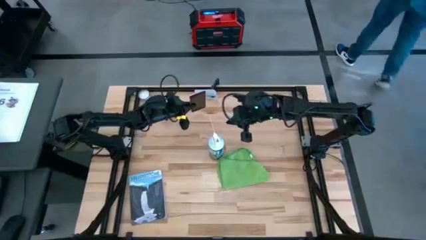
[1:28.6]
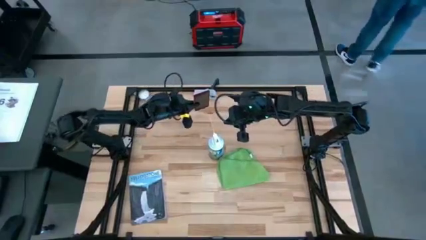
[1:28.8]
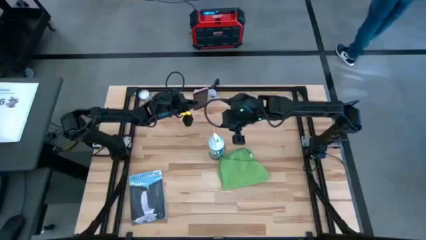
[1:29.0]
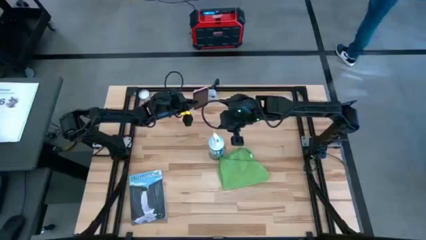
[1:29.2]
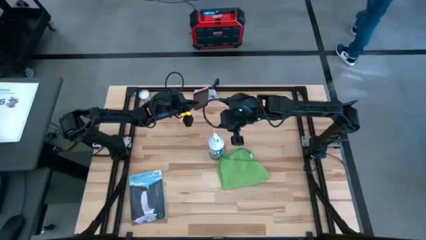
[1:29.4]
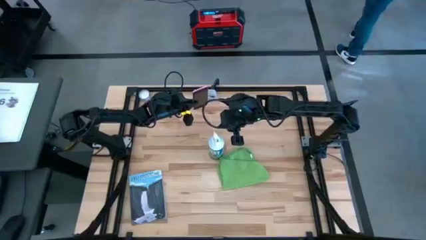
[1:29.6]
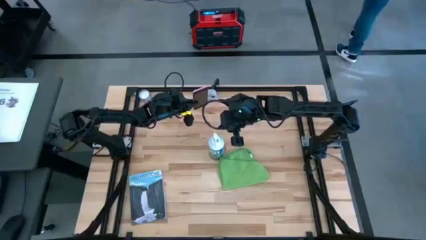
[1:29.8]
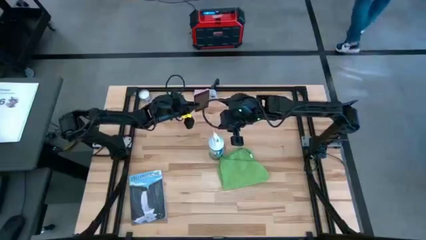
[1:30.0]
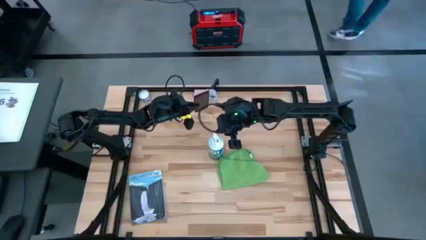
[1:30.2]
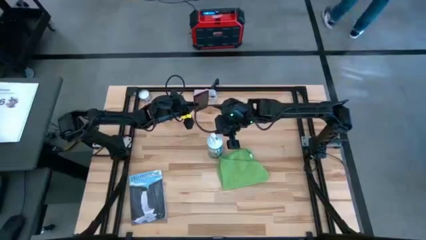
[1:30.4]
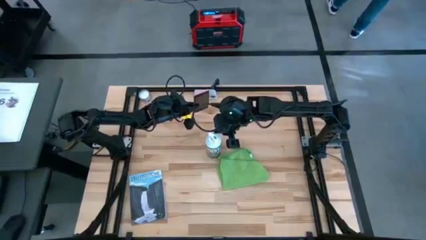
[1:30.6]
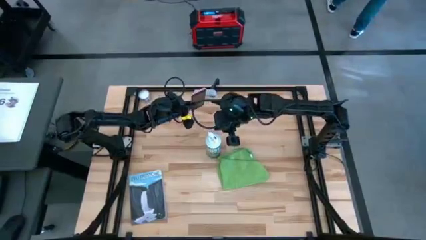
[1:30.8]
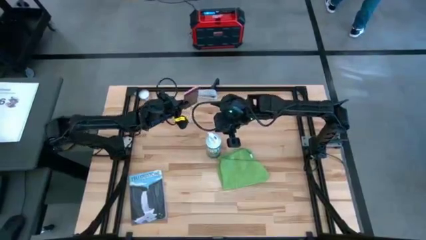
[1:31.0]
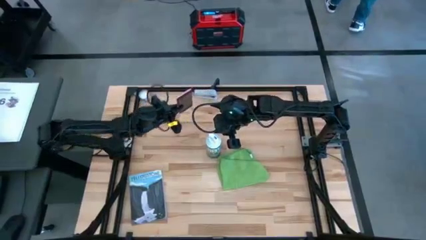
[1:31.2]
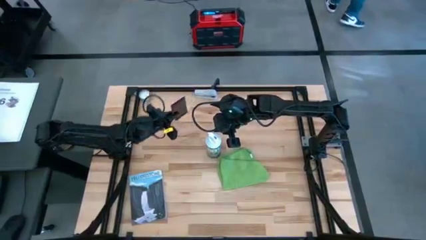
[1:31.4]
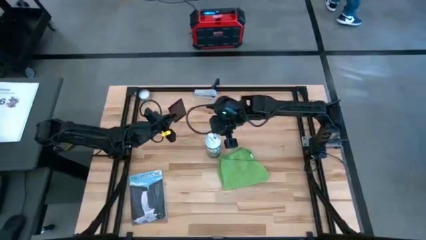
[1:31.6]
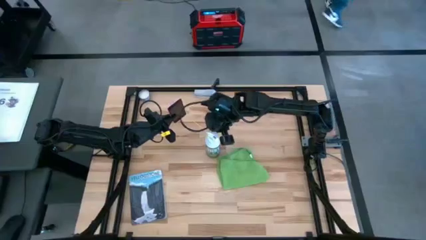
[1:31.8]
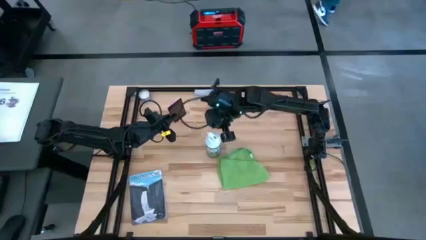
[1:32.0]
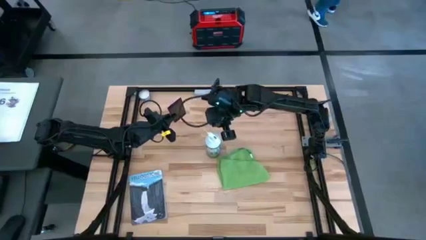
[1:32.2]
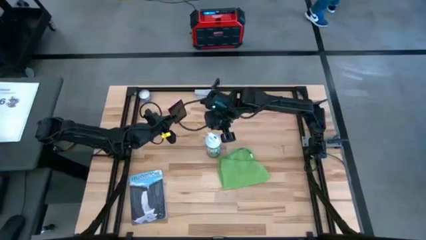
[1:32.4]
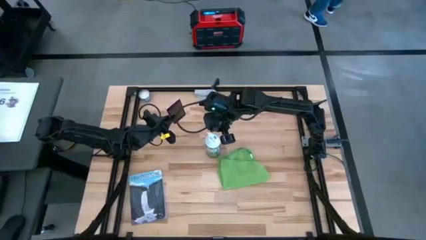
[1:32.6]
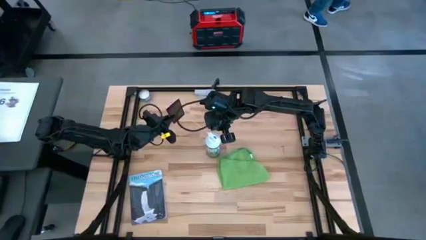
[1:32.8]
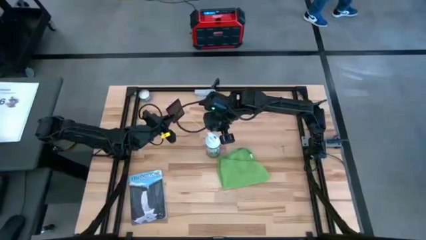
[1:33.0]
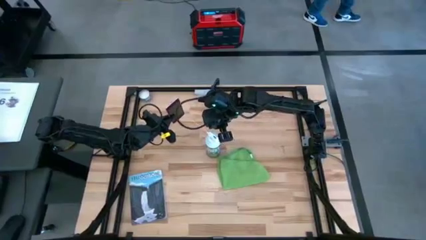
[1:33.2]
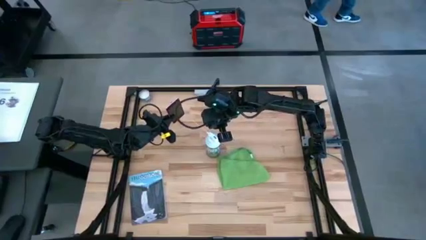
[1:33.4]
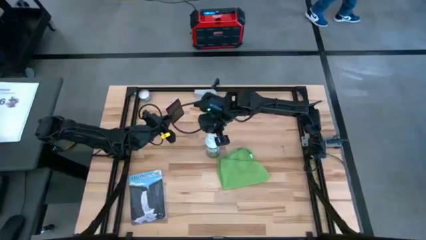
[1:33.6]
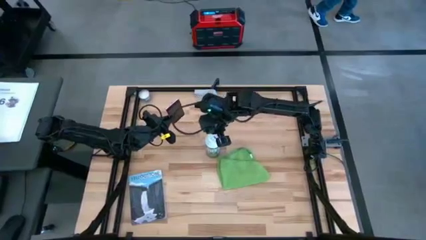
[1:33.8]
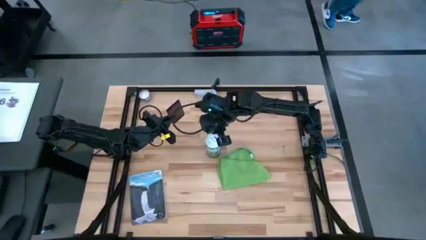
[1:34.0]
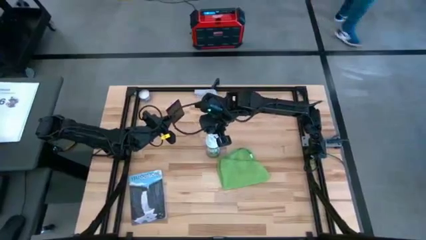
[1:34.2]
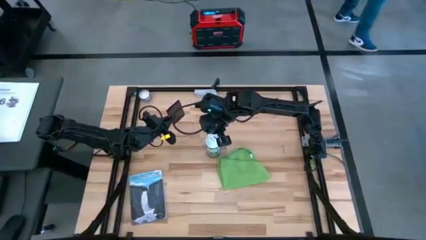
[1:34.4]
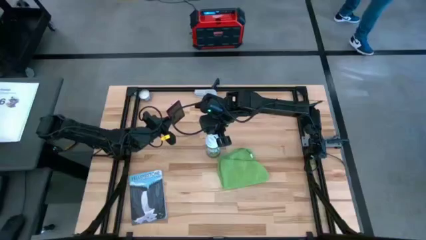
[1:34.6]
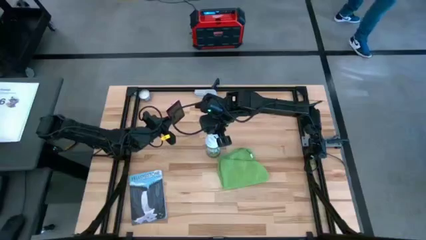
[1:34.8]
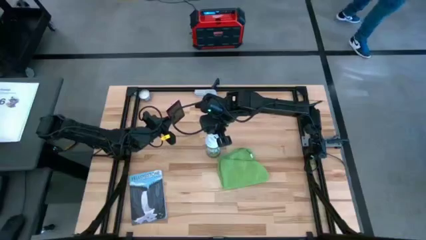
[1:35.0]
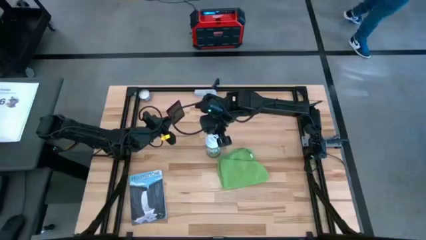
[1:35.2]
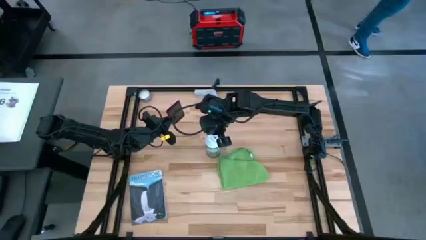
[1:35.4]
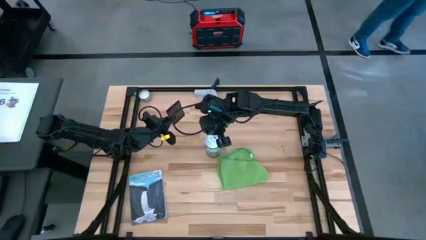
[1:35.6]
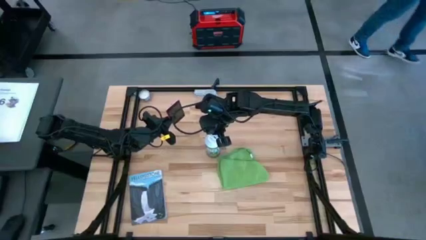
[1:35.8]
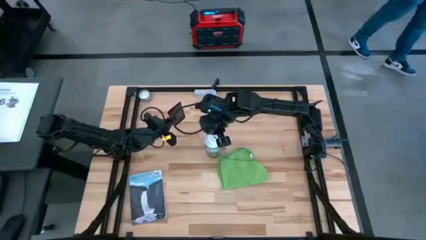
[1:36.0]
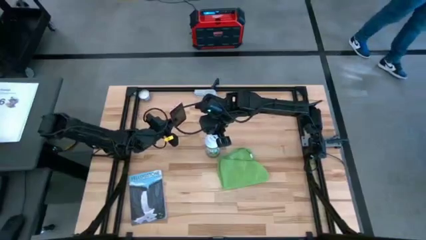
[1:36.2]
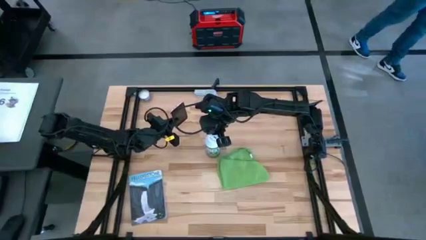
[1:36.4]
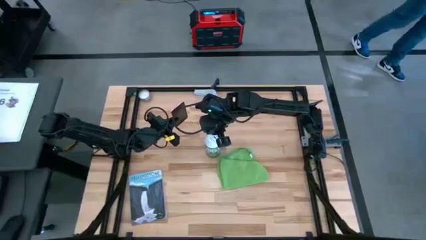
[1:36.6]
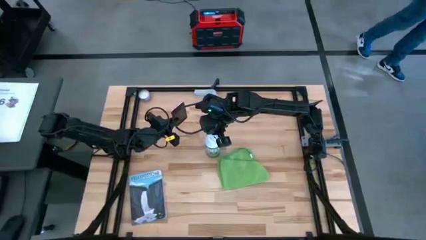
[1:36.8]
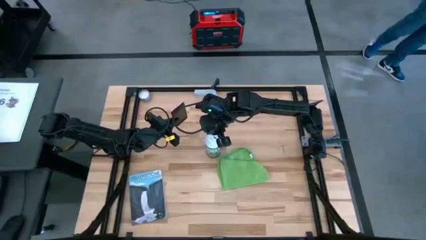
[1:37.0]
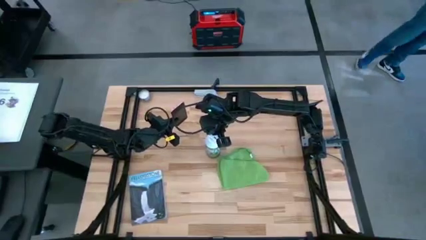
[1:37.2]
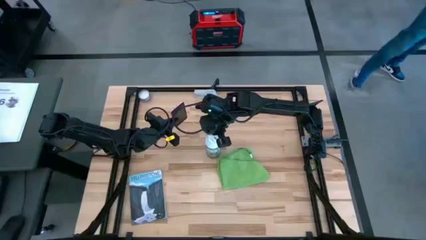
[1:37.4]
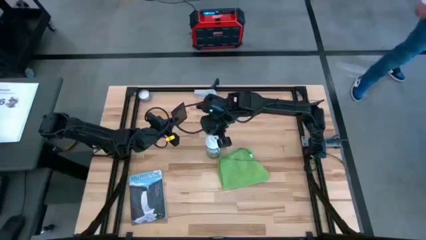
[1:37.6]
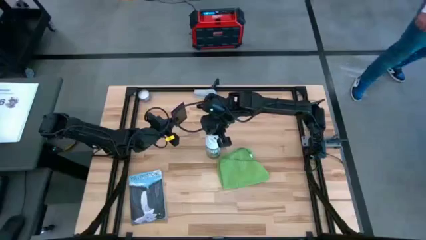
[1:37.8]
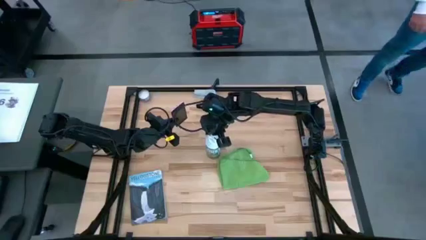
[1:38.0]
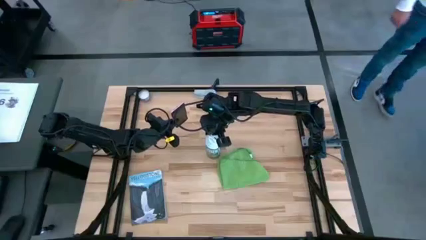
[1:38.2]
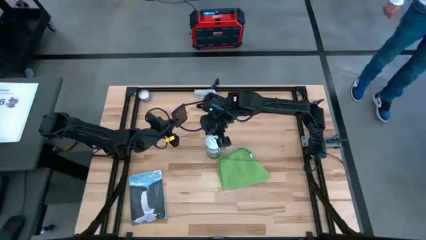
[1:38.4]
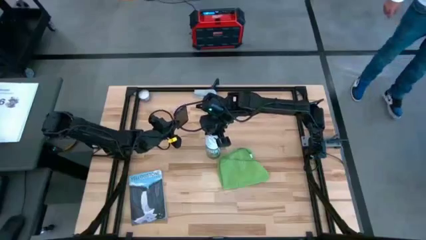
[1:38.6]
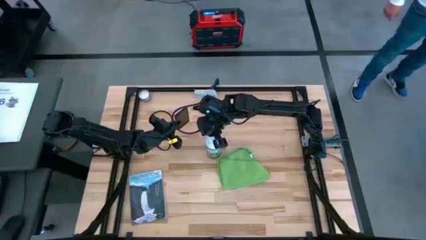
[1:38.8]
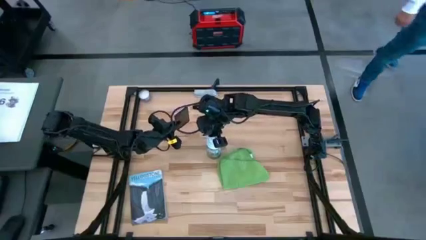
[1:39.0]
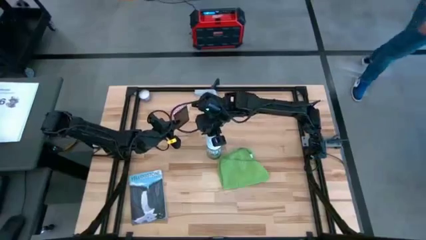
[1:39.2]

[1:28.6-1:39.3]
Task: Apply microfiber cloth
Spray the pink cellphone using the spray bottle

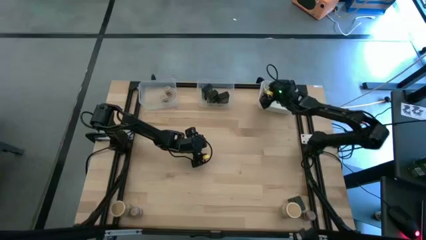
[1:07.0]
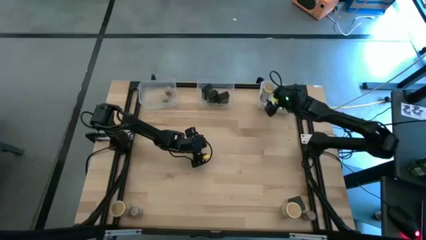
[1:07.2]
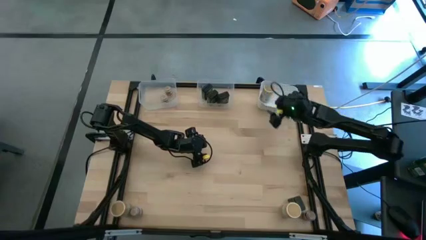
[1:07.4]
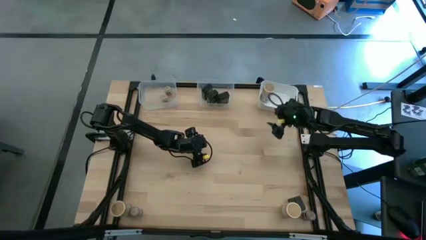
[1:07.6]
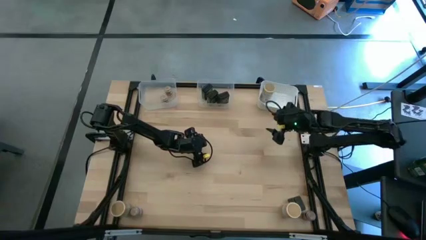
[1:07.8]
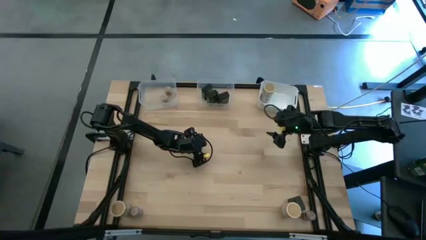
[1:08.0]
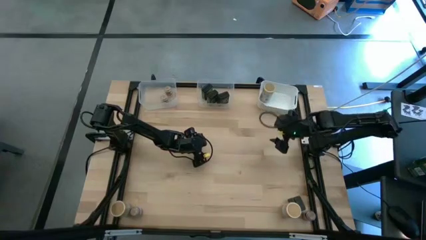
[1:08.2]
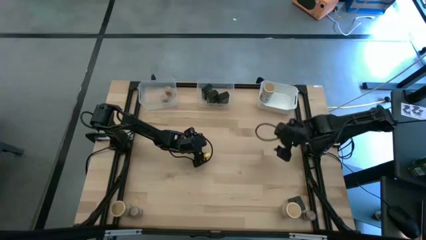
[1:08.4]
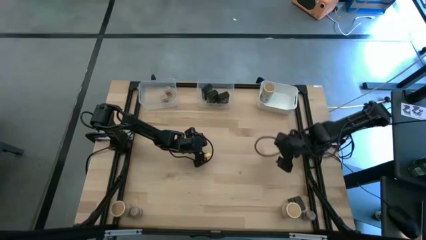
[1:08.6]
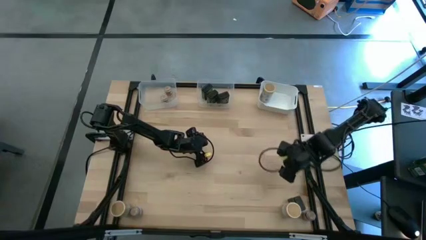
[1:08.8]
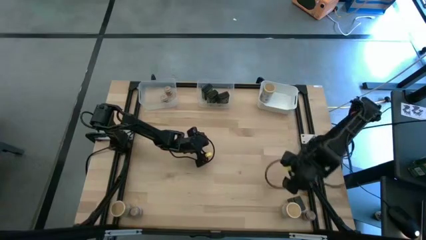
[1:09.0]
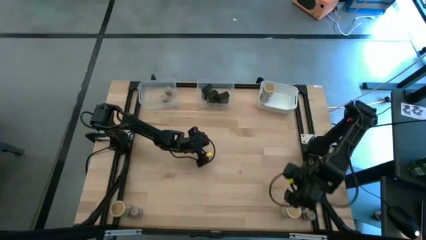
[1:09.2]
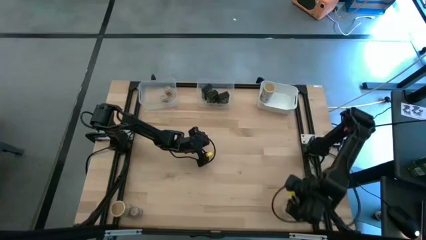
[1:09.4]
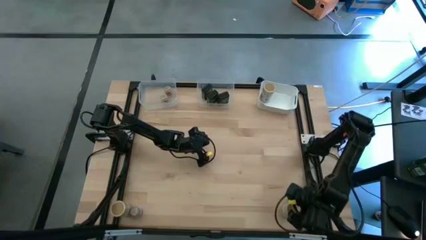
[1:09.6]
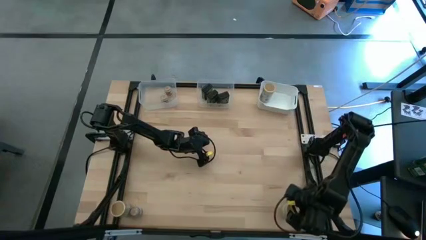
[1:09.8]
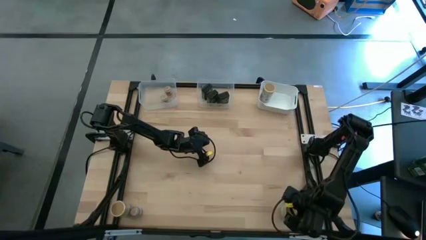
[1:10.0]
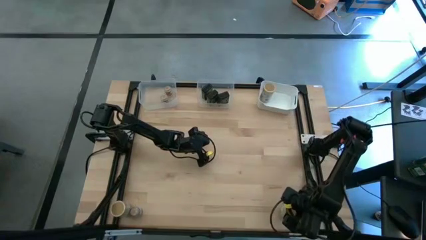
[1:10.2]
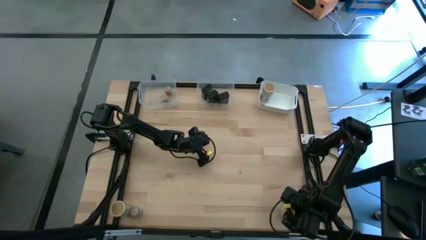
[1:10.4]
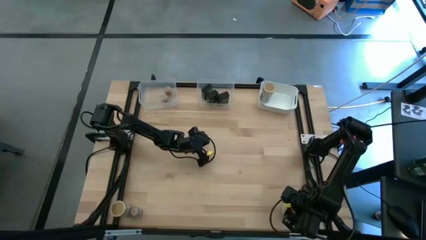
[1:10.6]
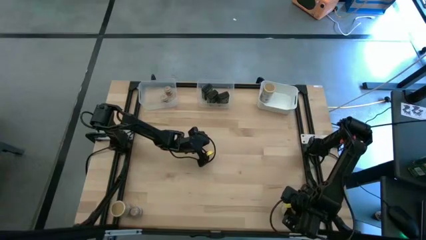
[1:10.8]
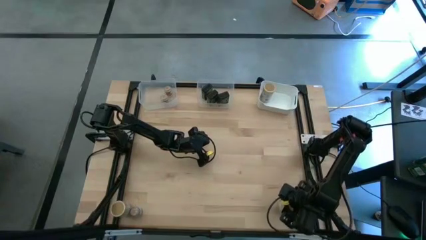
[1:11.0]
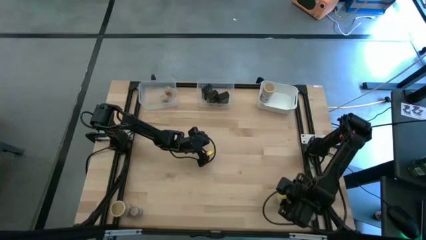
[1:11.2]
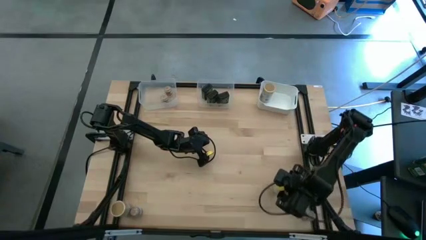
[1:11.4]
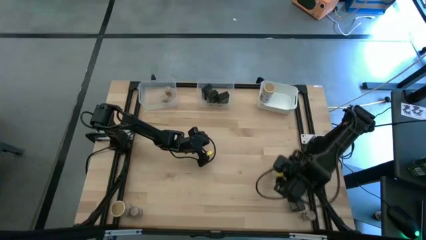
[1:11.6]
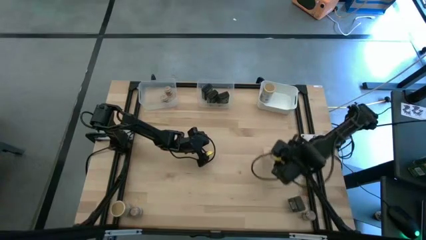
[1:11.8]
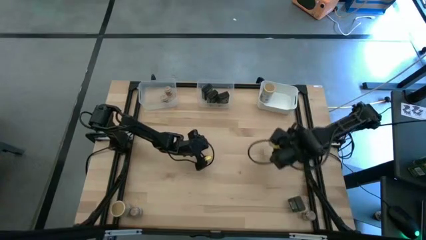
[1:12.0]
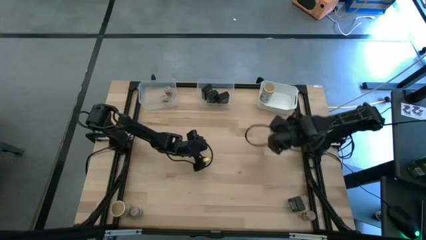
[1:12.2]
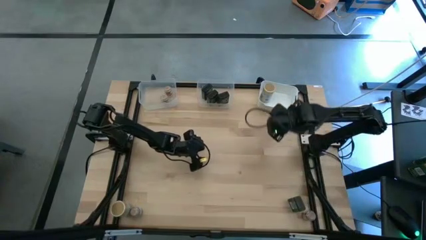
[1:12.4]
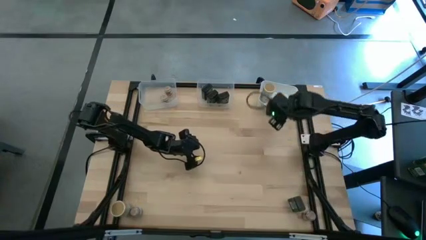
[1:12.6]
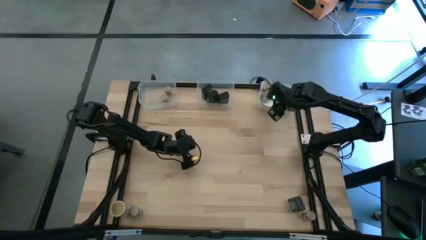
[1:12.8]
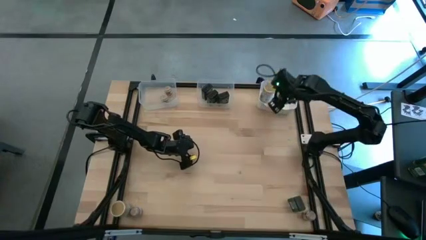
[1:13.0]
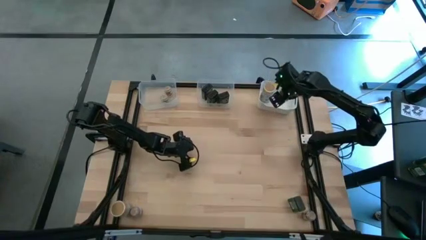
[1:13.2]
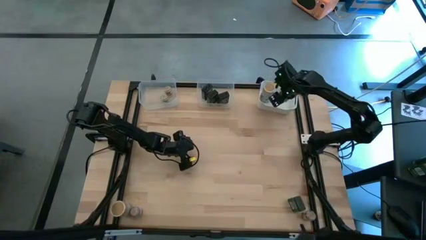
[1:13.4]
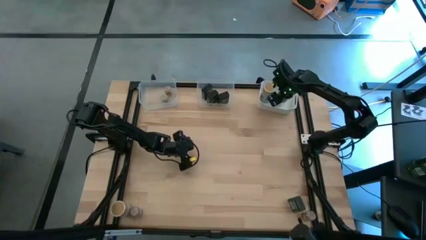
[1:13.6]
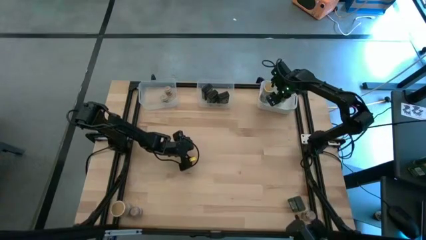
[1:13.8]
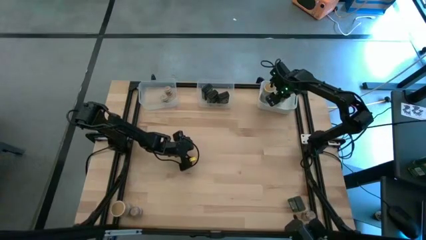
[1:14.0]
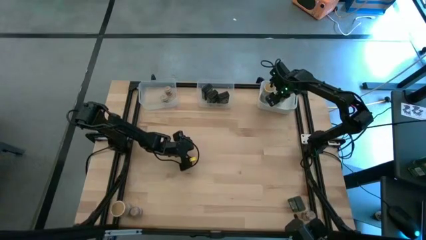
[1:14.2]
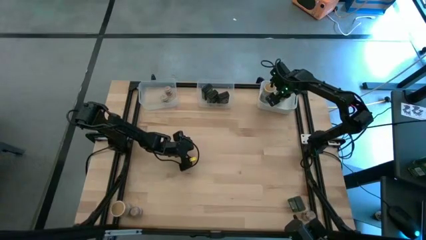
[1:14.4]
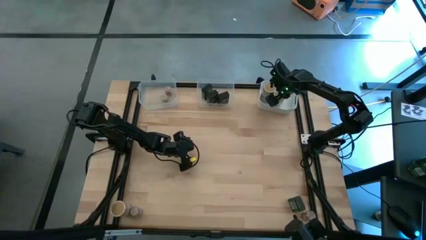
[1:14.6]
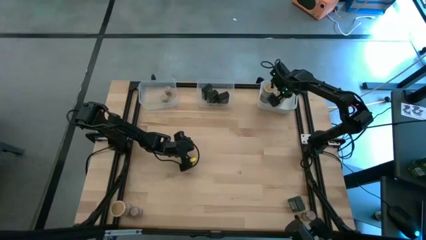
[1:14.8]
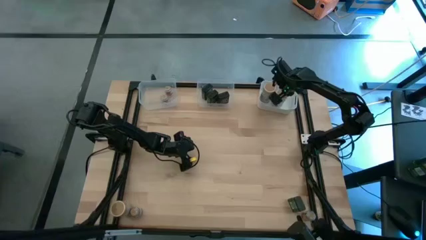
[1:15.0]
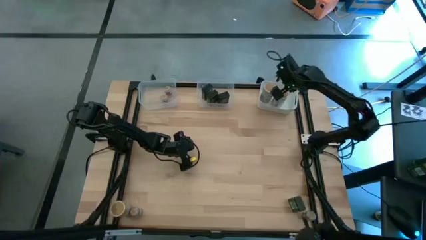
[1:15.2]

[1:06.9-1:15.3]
Task: Sort spices by type
Put the right gold seasoning bottle into the white bin
